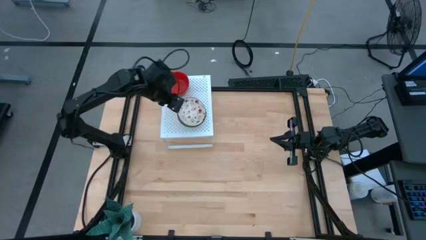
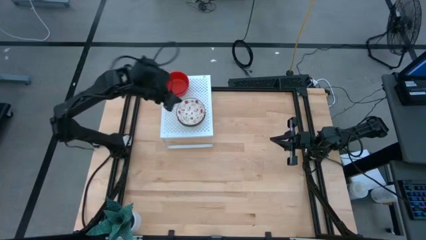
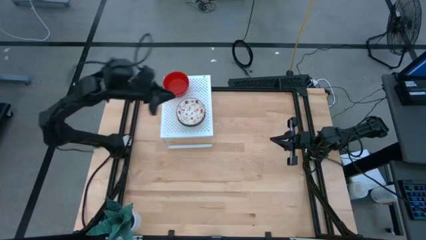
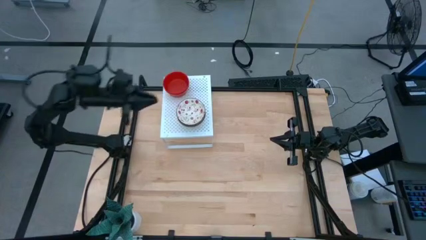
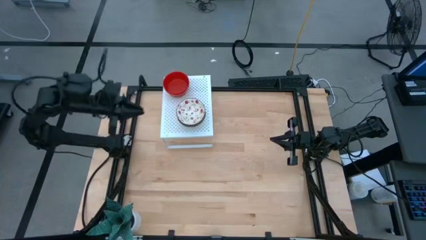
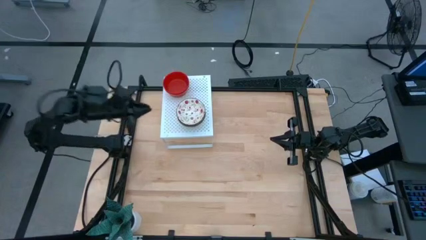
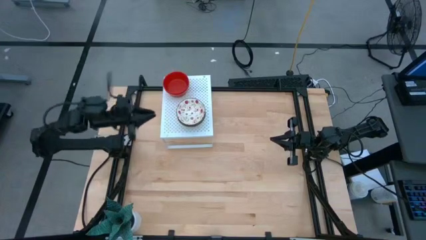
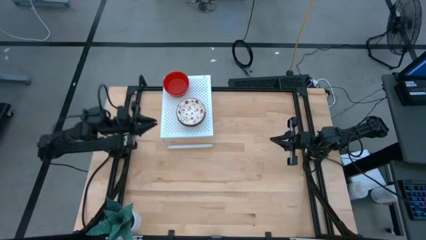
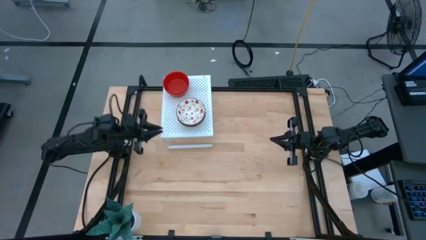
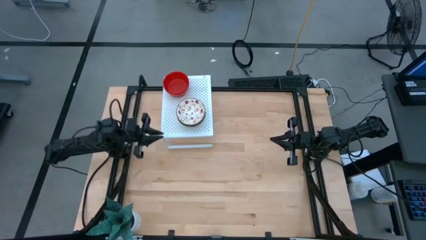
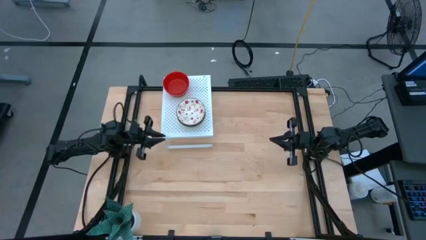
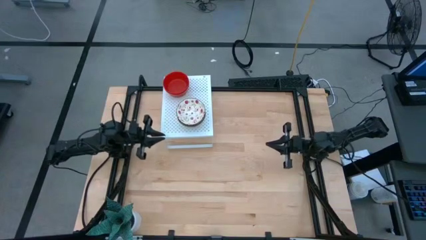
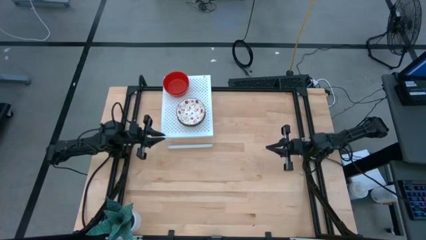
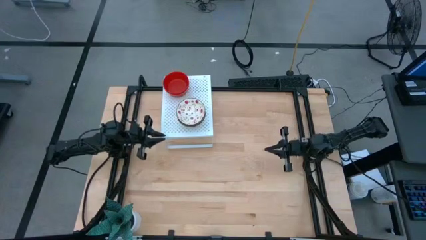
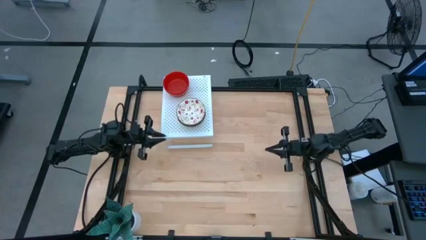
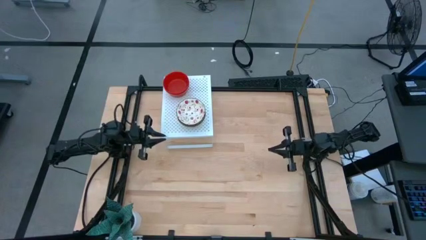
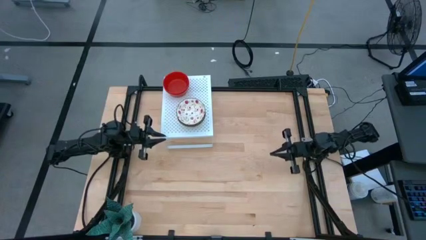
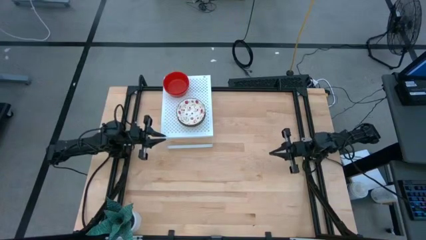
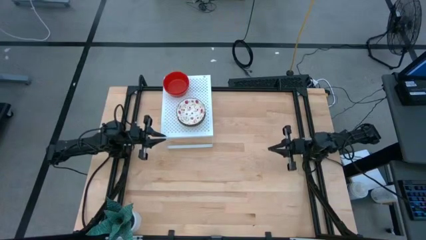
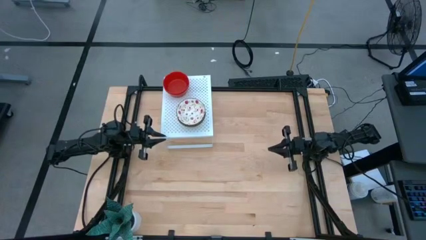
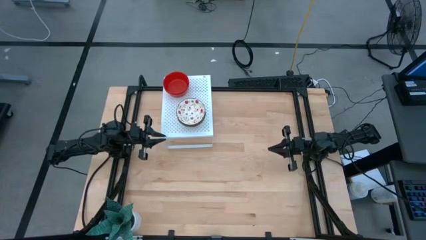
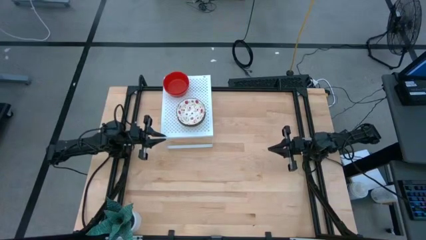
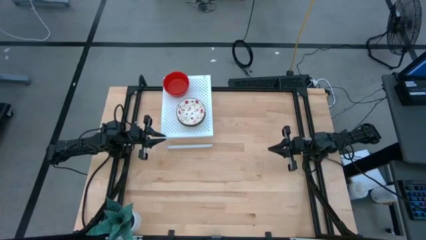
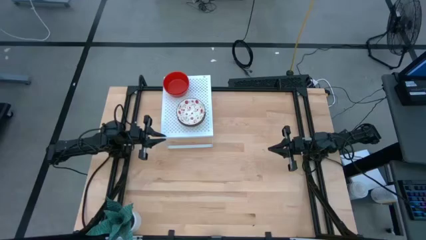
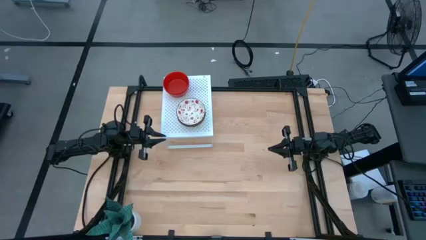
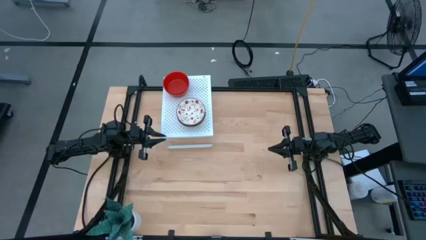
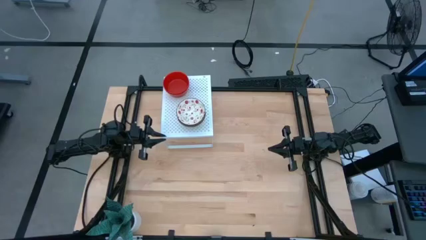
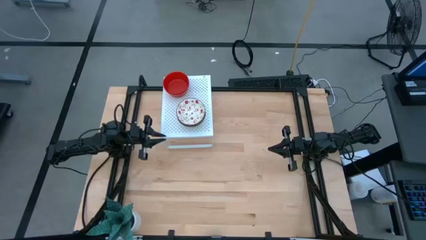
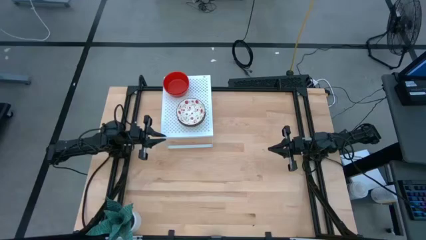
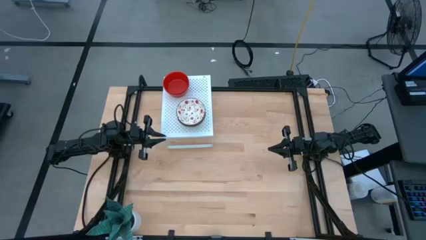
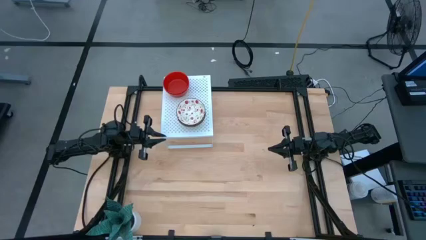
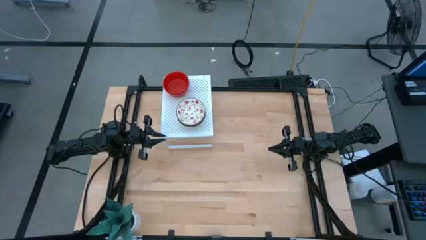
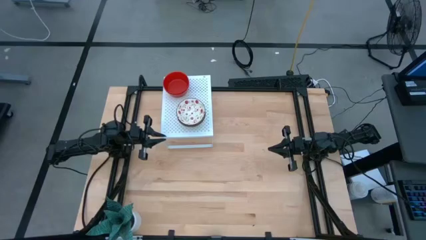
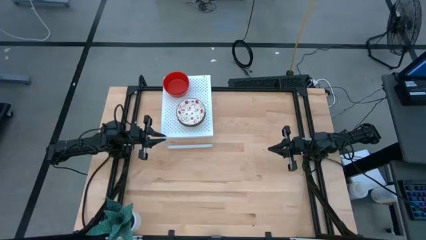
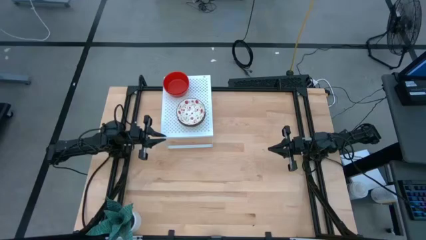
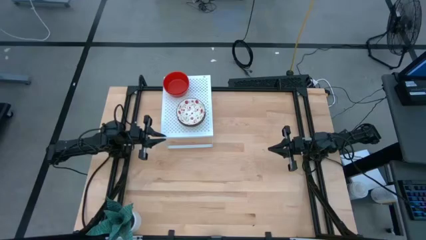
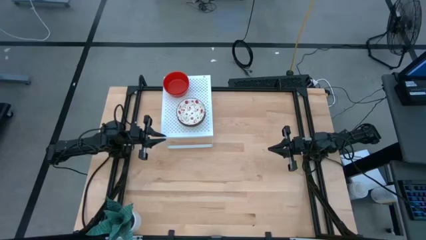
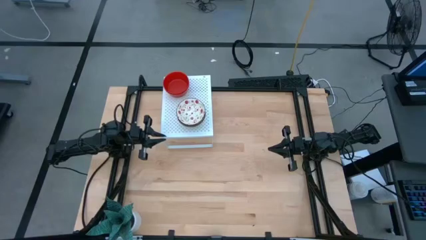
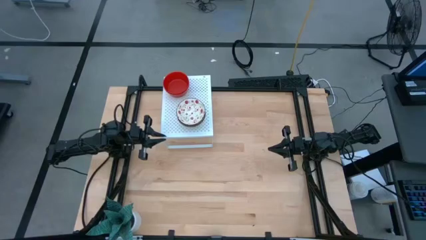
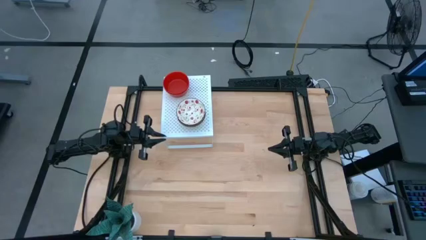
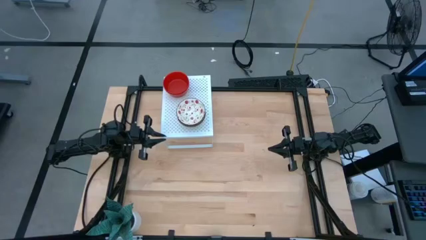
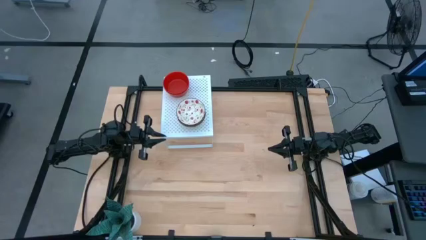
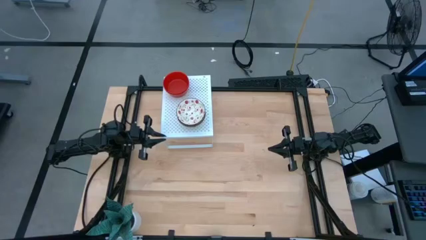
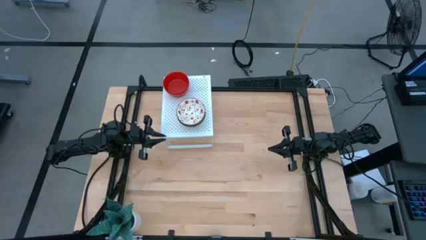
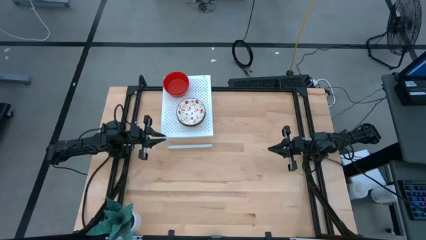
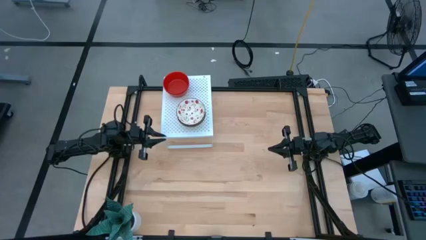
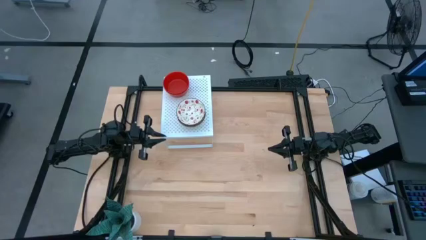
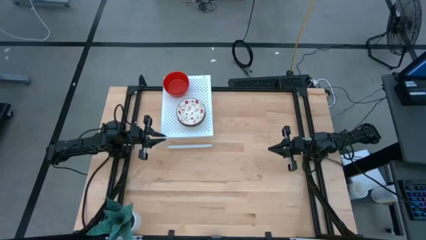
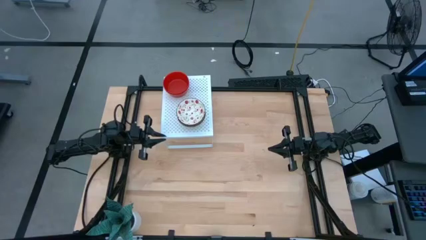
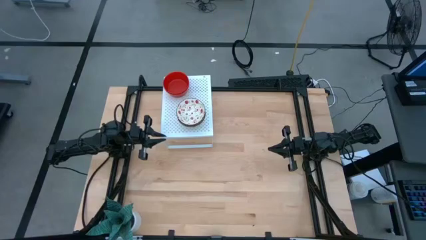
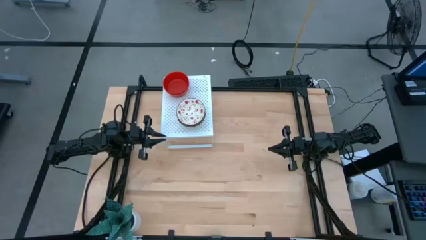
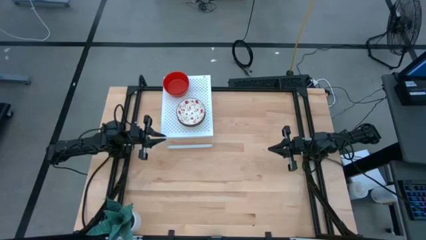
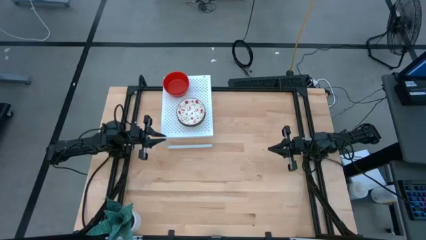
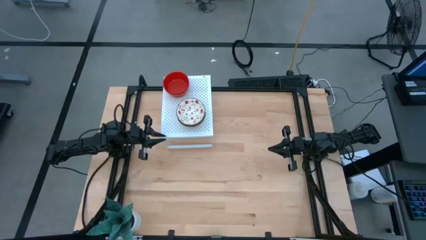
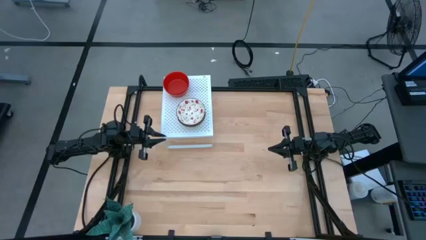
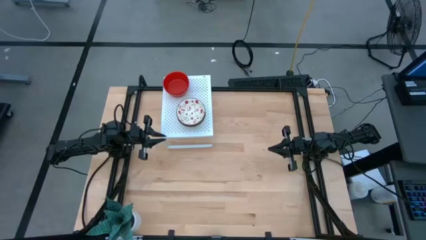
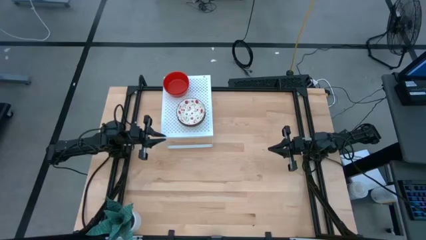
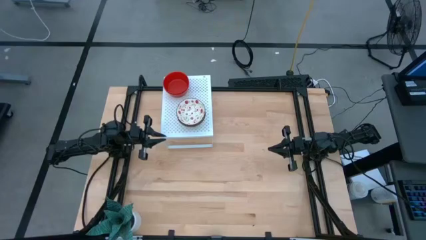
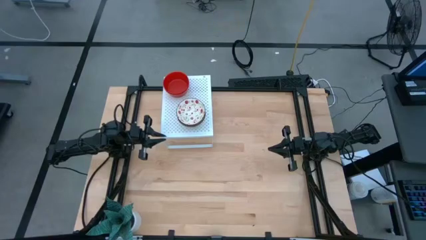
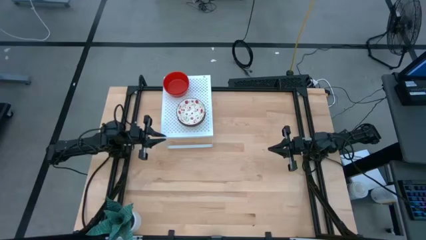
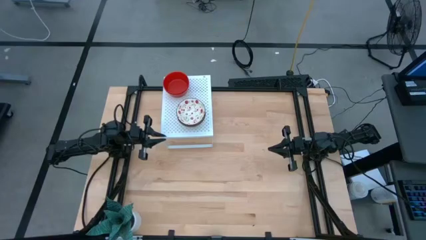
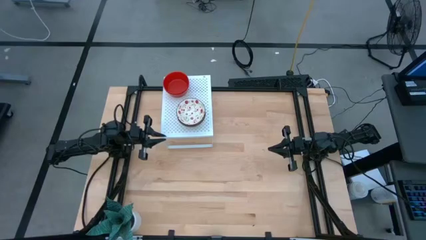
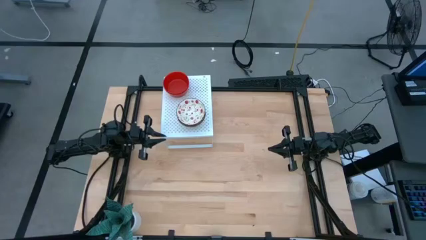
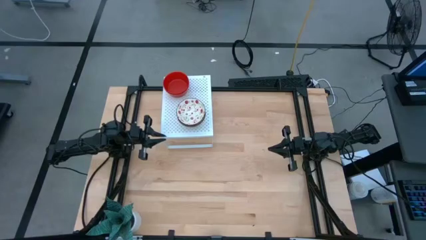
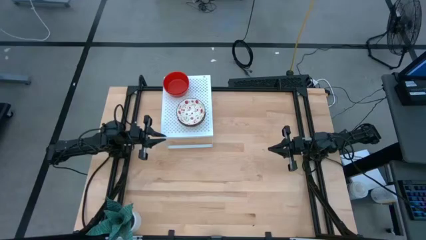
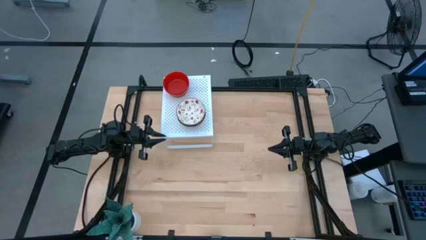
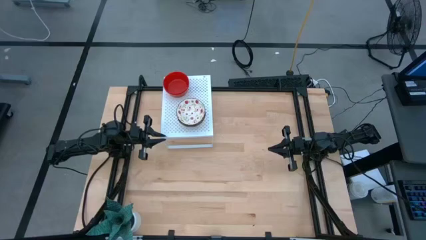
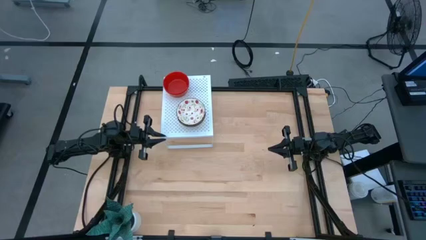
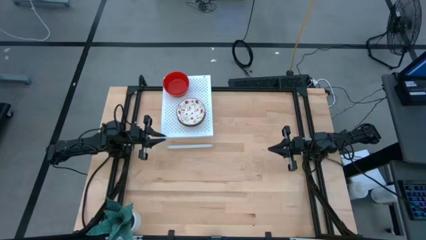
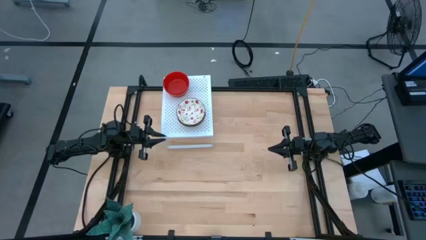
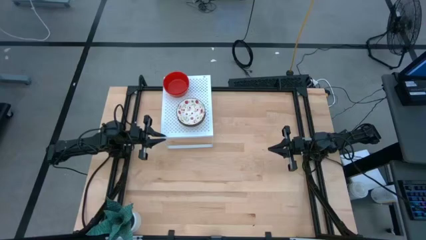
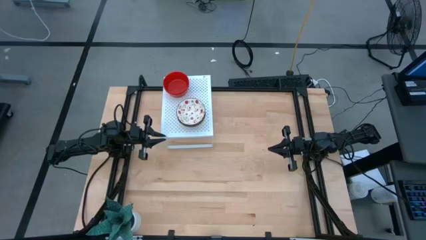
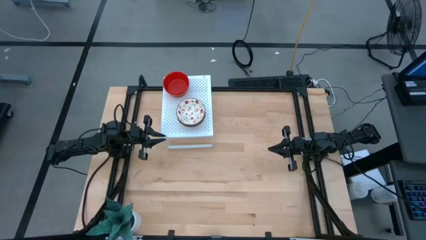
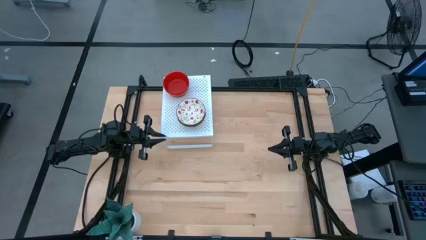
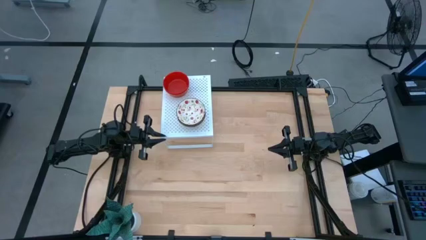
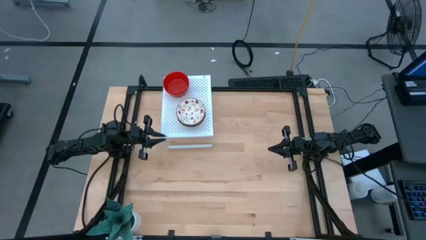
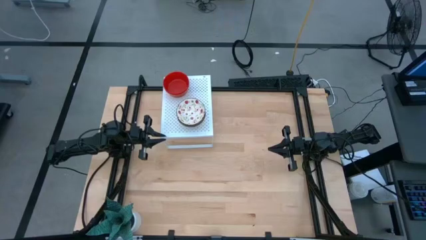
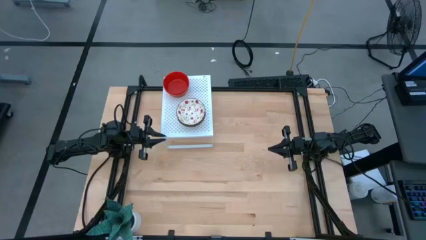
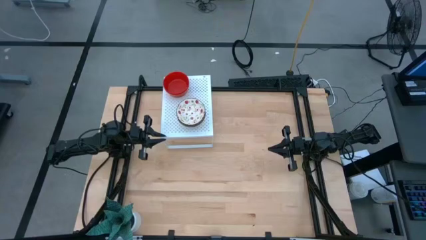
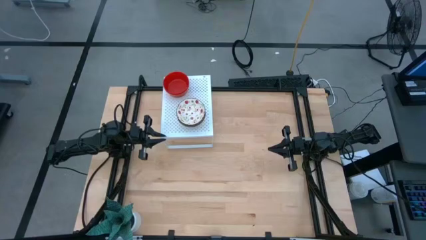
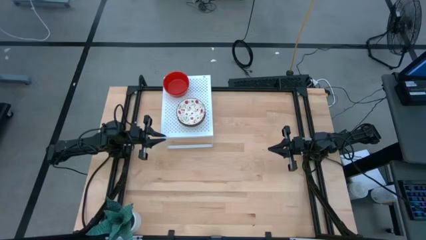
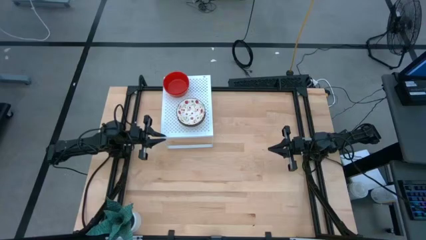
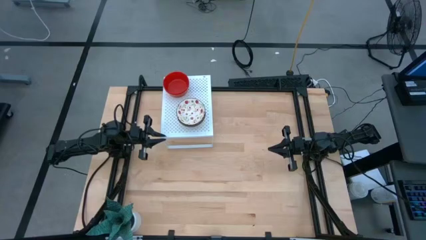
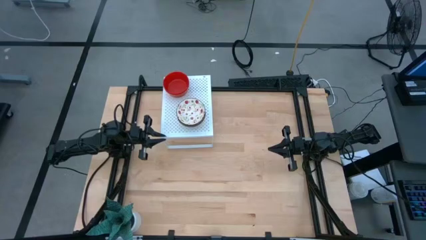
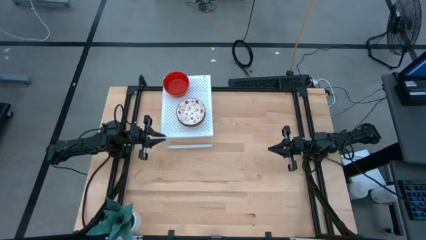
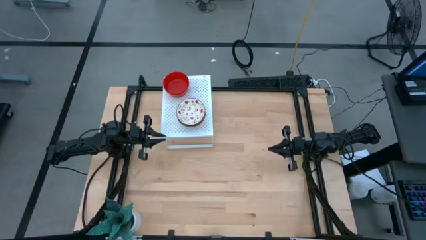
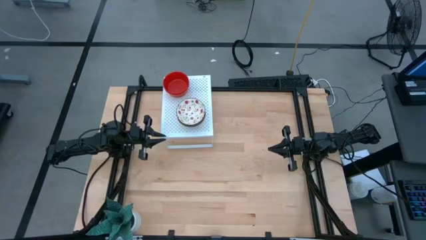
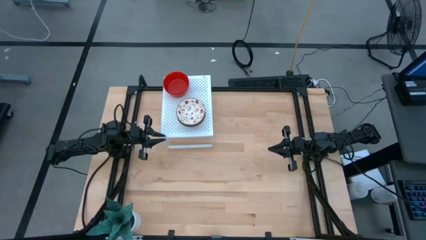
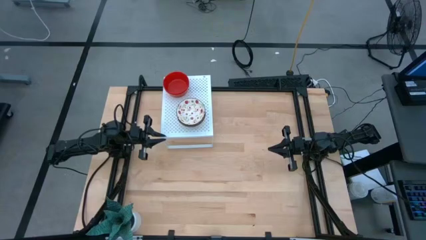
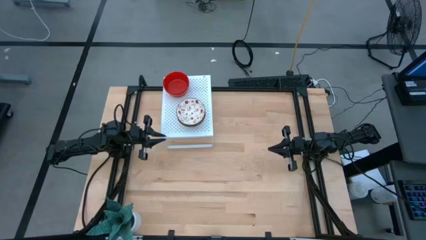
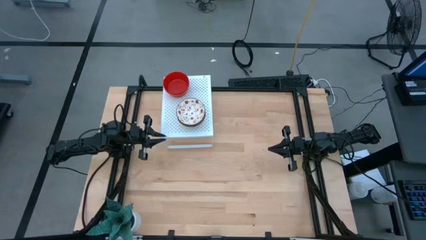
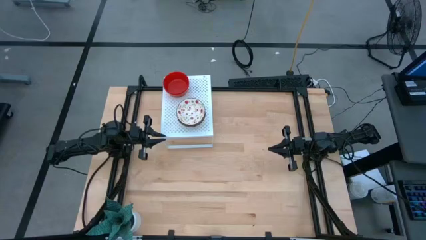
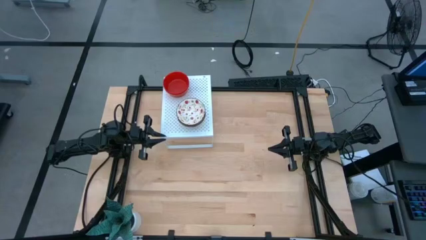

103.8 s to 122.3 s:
Task: Pick & Place Mini bowls
Return to Home Position
